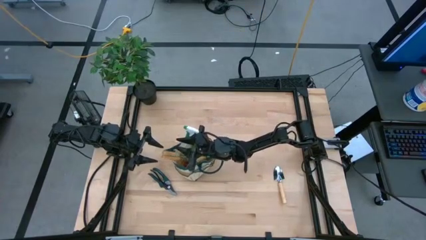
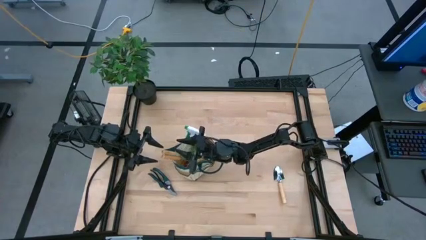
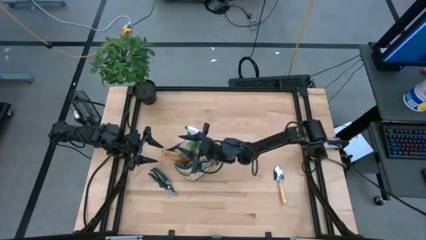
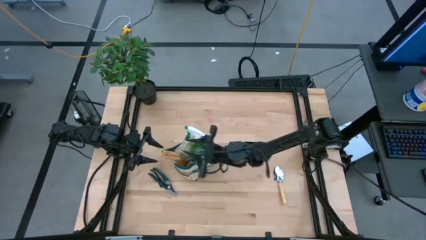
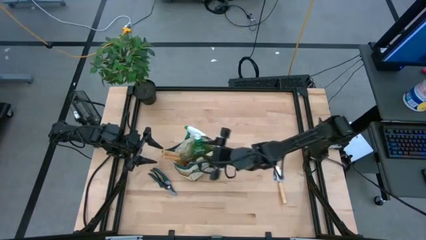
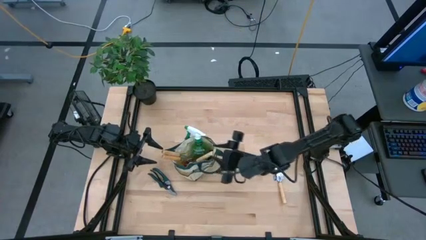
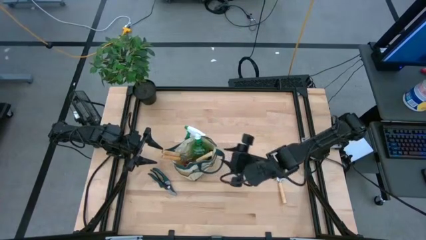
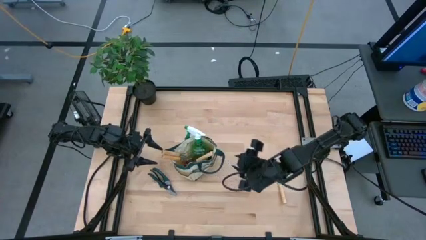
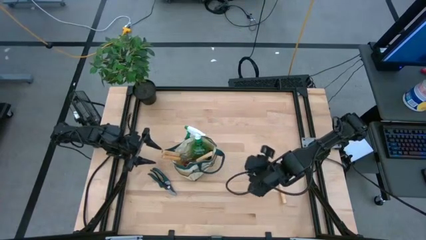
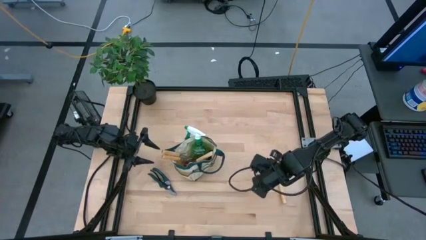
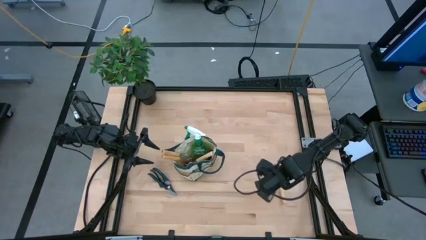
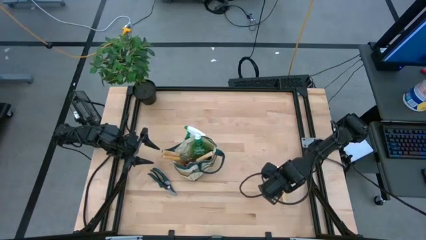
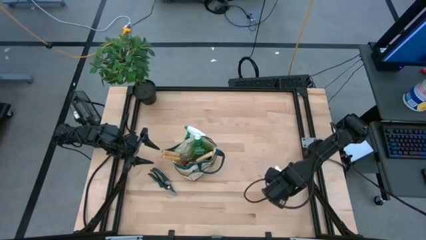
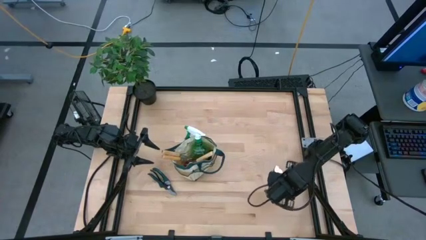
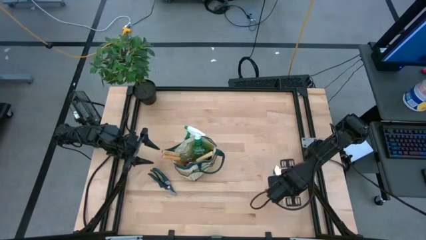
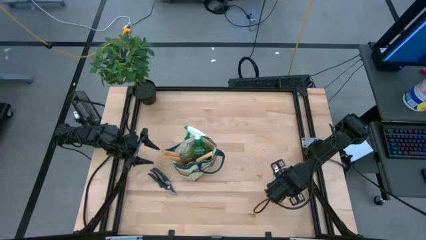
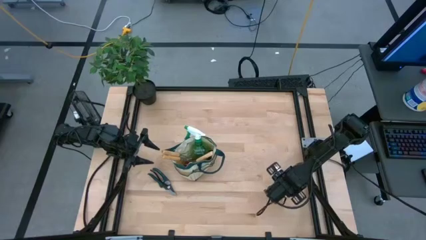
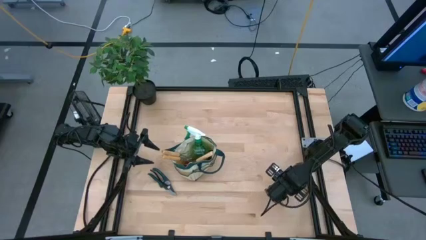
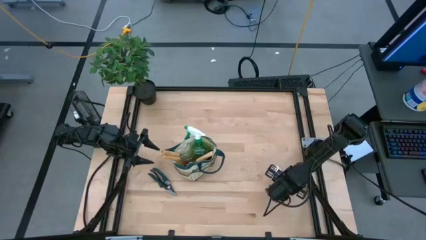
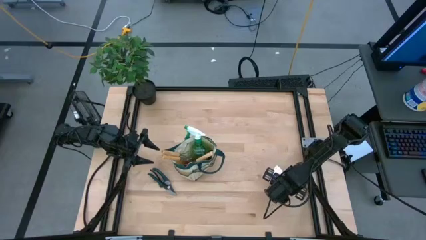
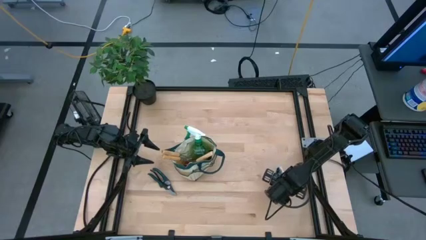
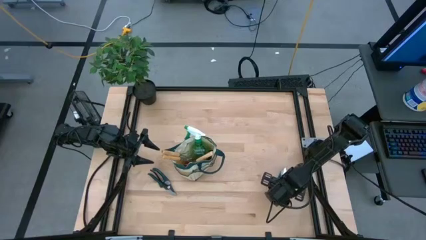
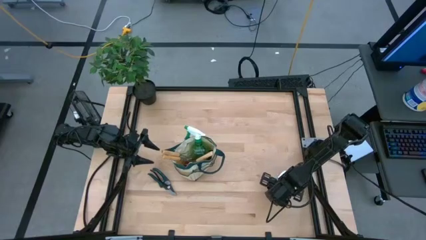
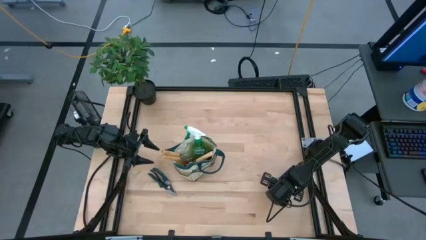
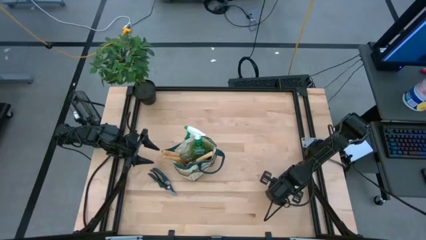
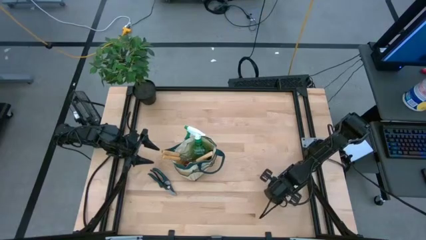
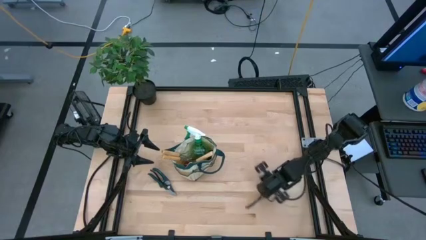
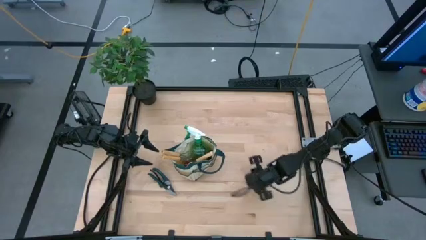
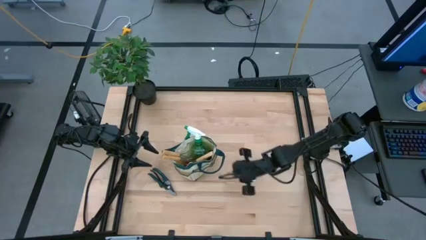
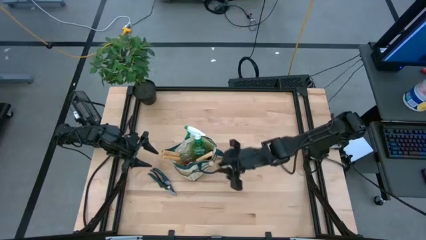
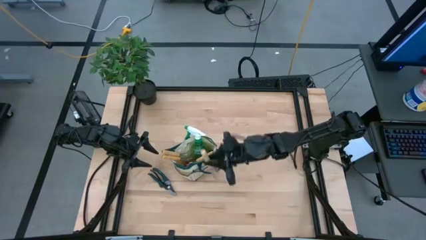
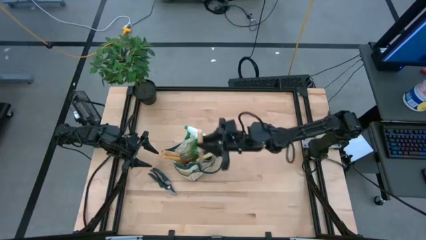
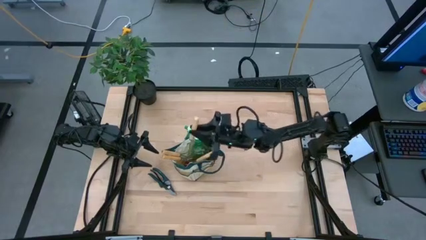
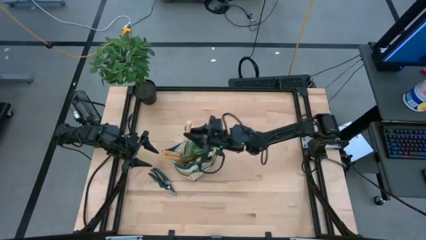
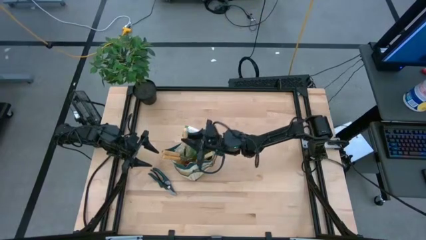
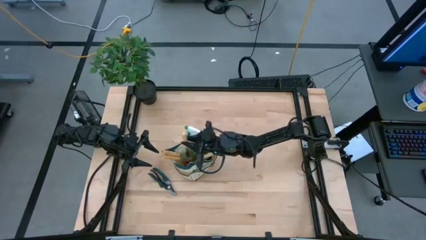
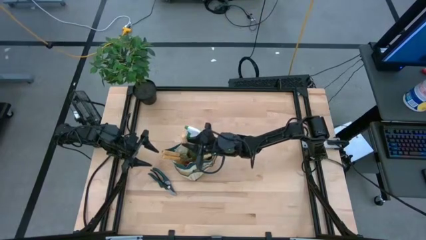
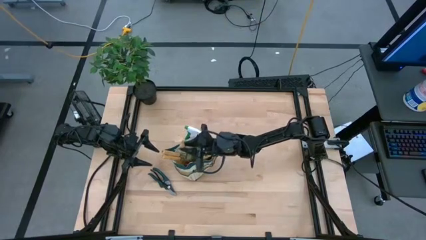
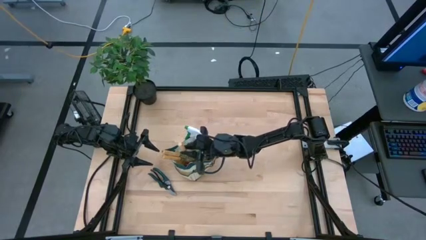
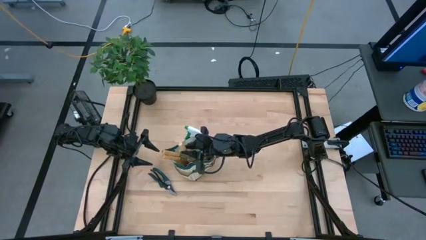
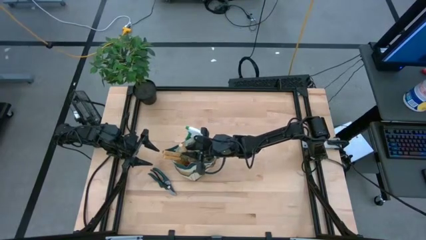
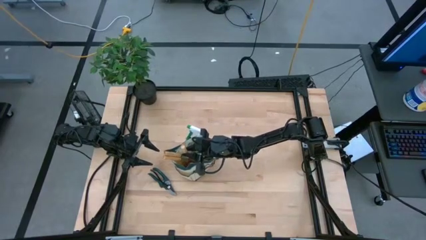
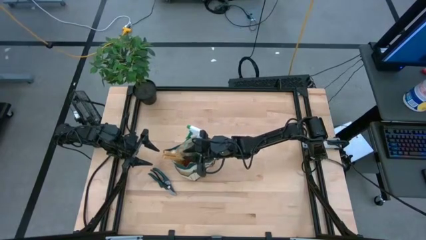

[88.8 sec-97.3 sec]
Task: Pick & Place Garden tools in Gardening bag
Put the brown trowel into the brown bag

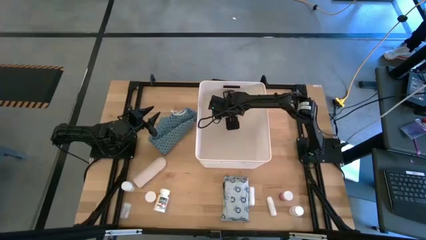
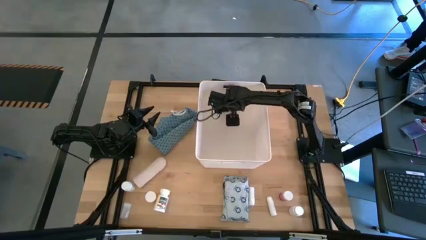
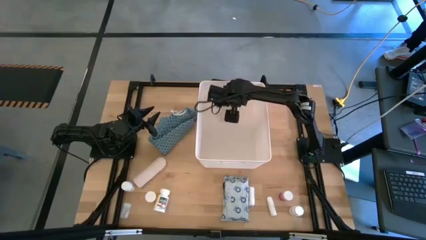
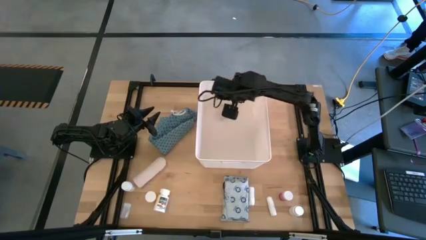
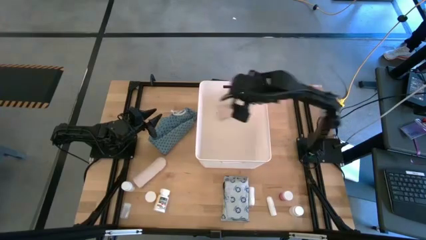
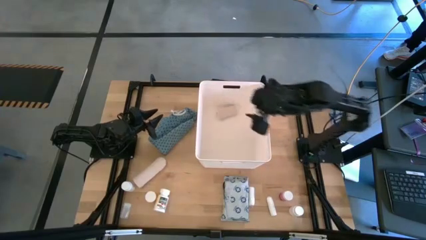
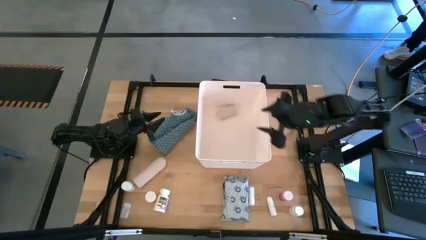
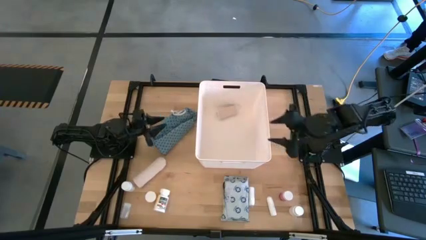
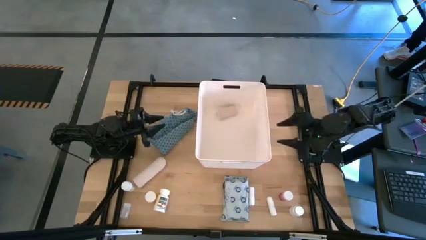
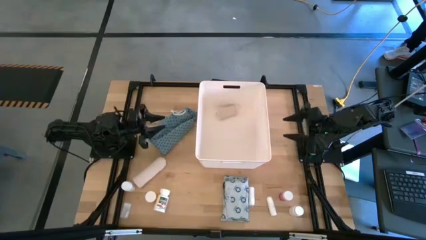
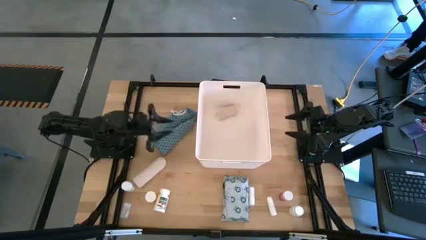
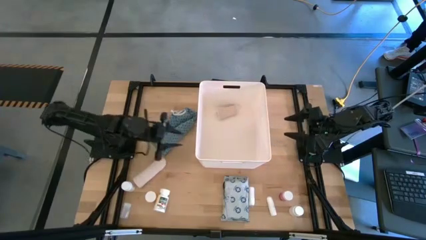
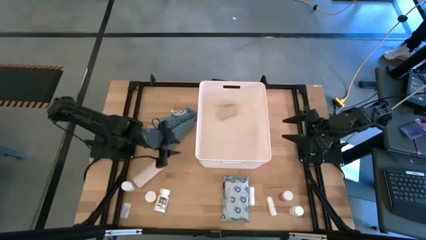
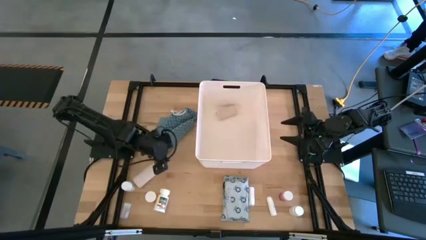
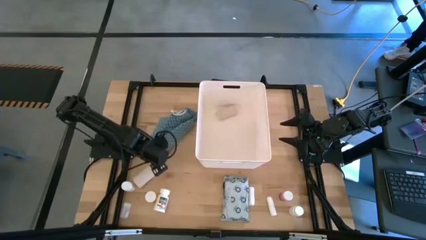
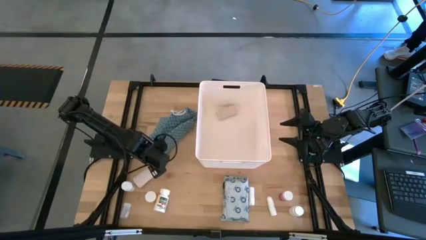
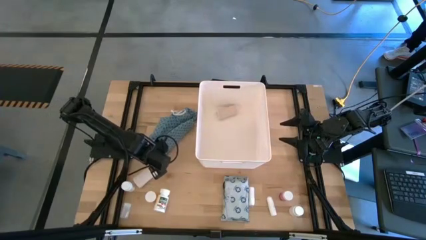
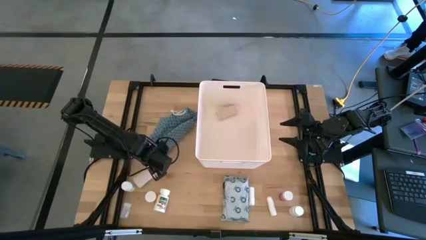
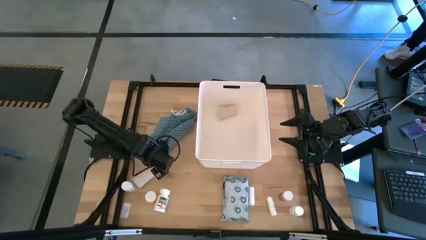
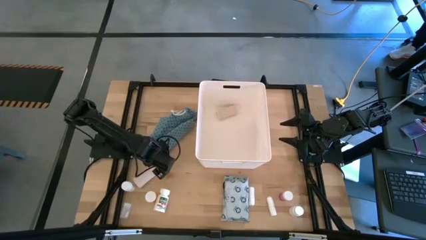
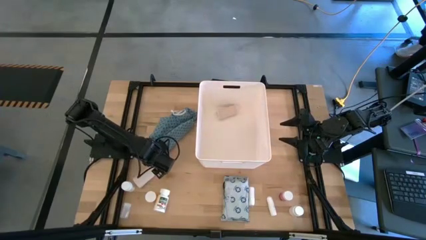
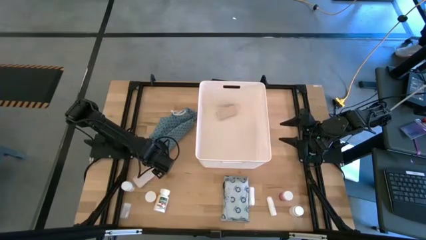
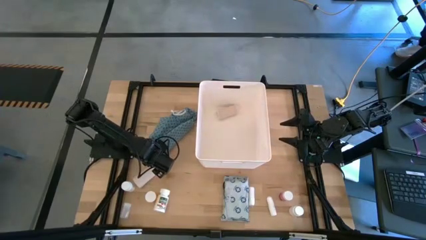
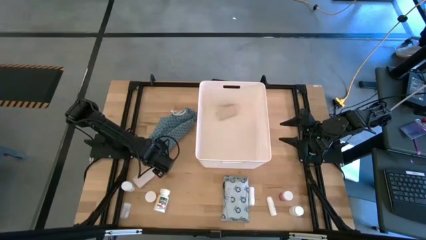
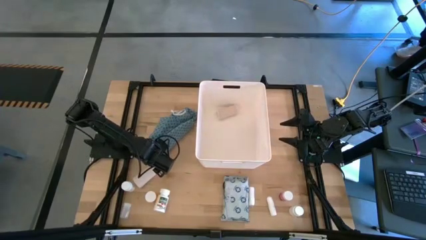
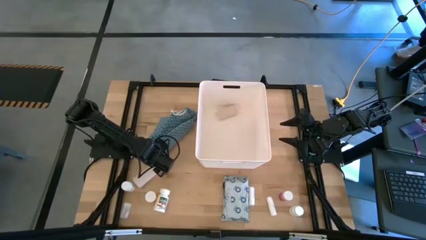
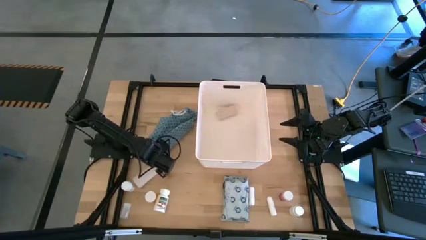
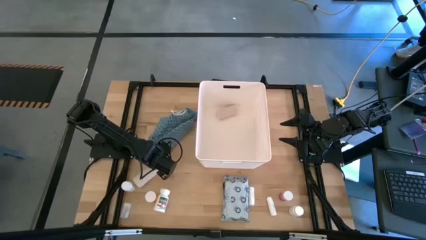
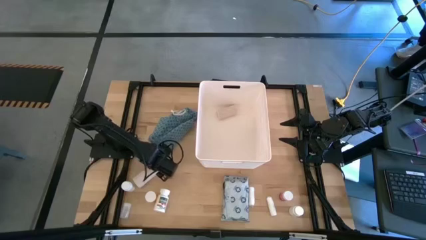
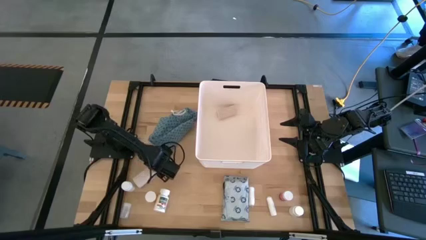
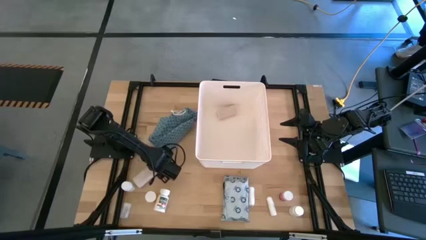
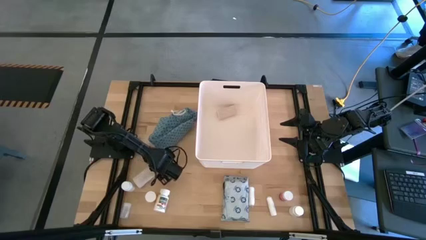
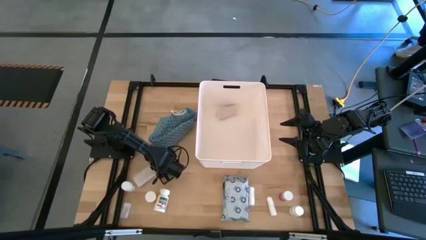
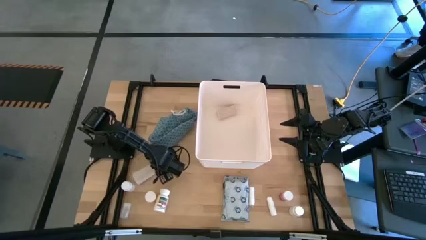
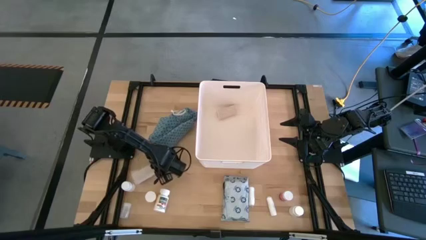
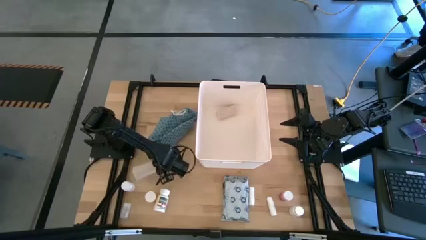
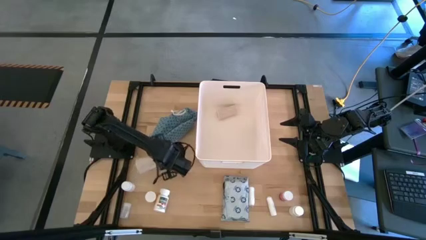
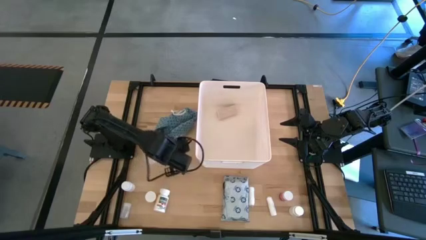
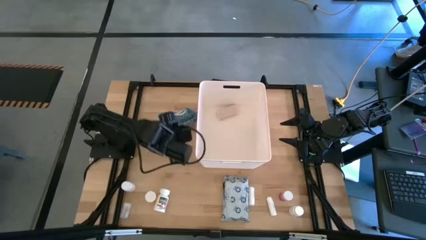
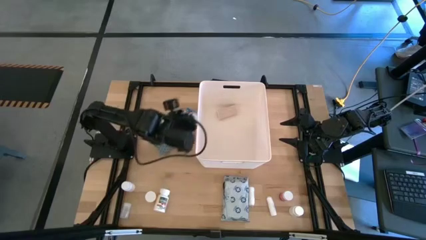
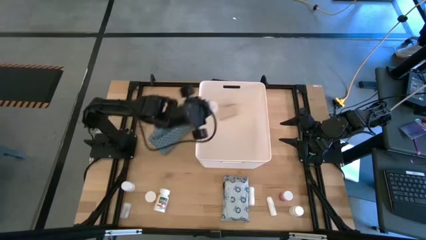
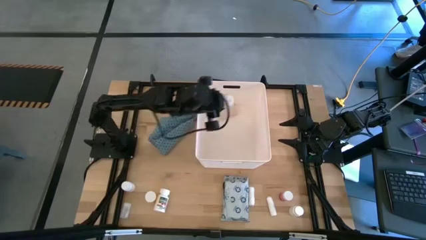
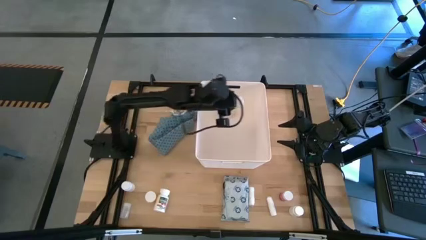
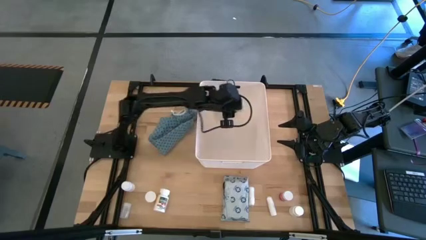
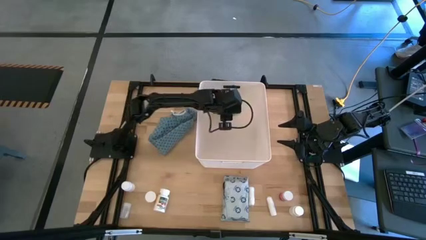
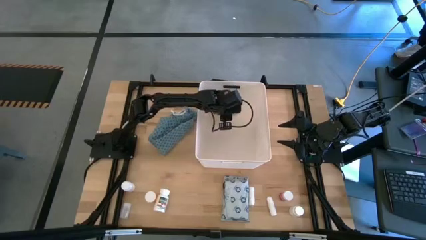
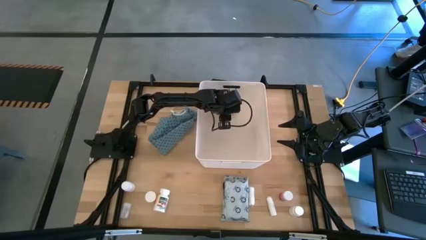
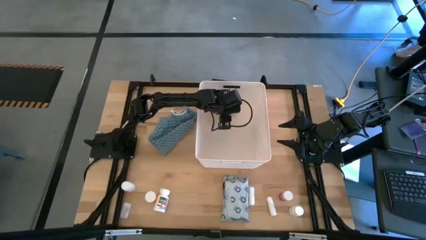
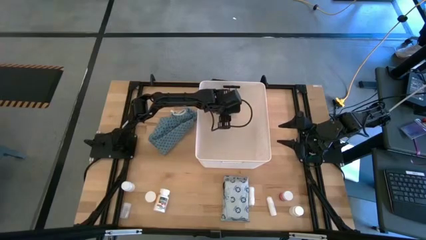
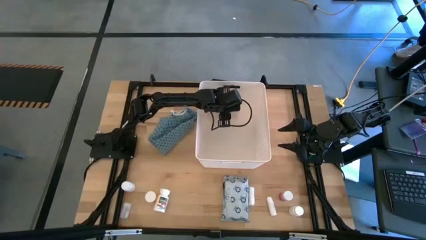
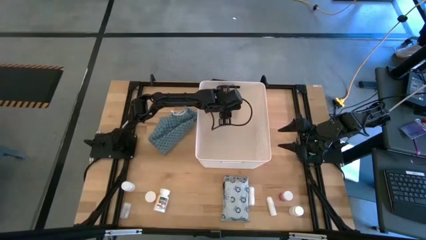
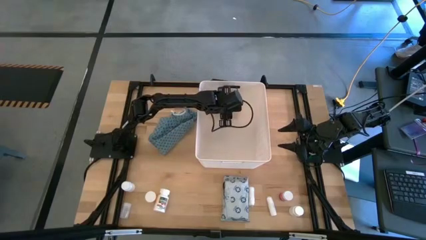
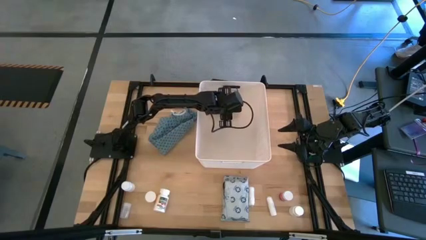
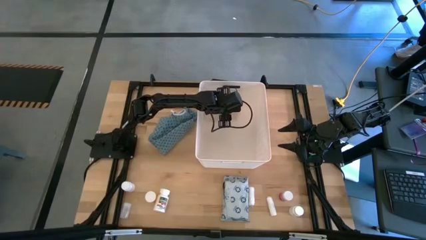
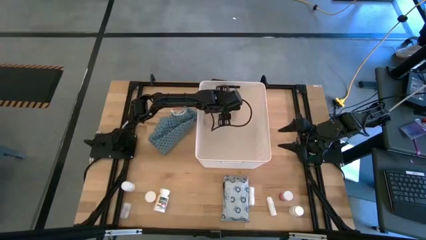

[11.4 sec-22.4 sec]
Task: Pick & place medical supplies in basket/bin
Put the white bandage into the white bin
